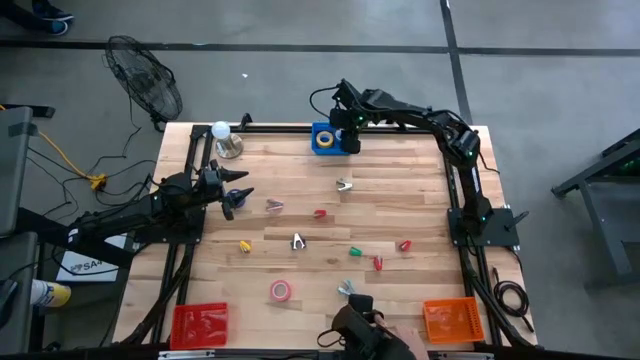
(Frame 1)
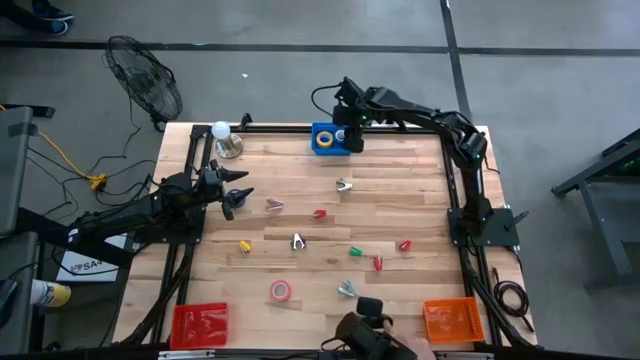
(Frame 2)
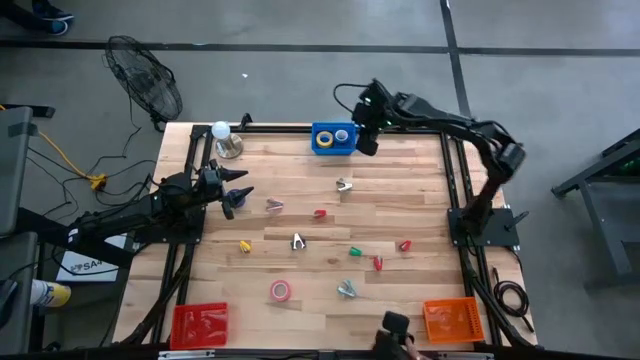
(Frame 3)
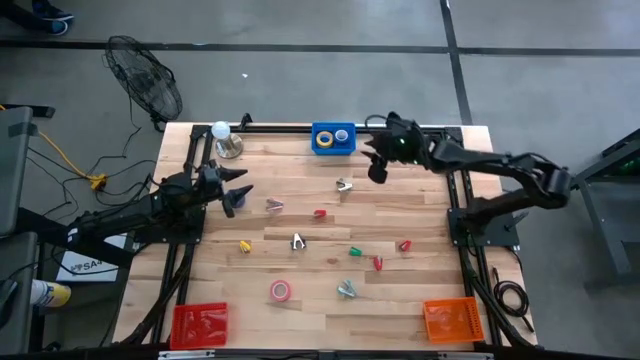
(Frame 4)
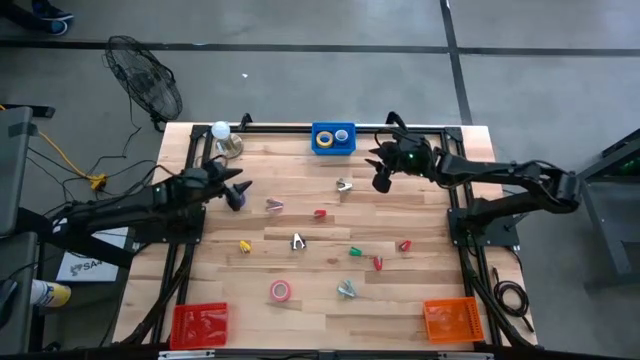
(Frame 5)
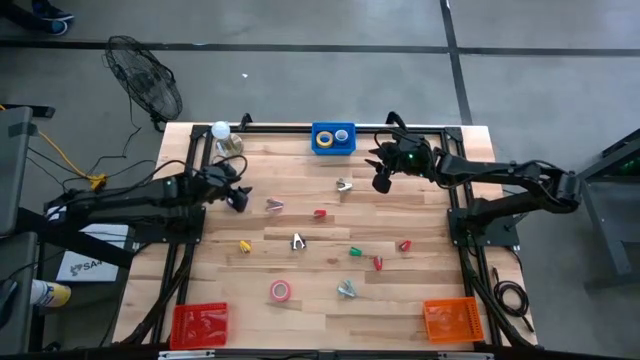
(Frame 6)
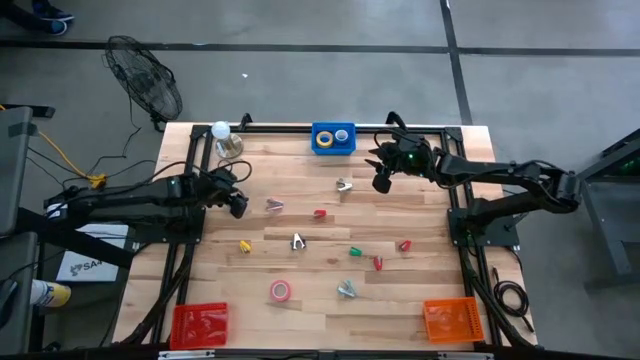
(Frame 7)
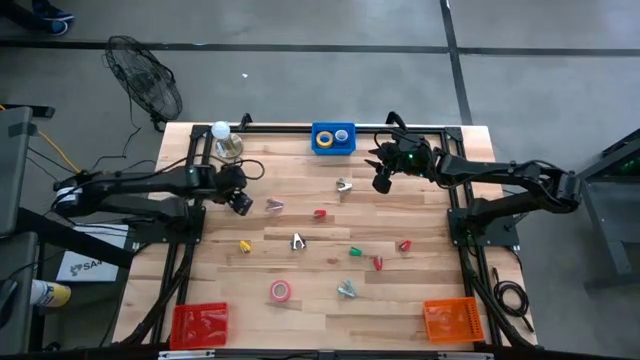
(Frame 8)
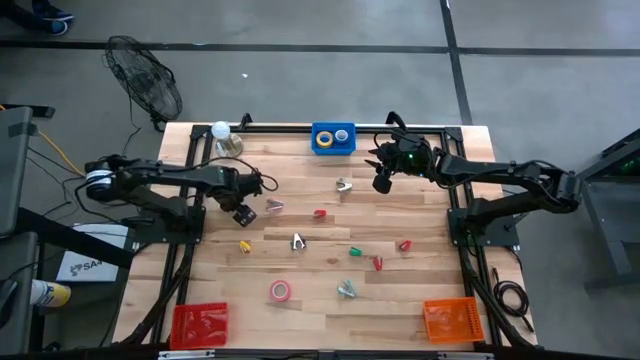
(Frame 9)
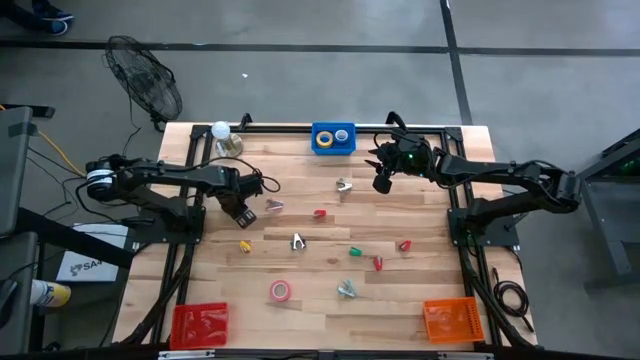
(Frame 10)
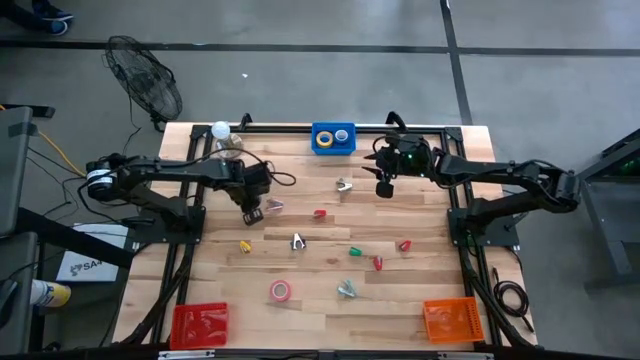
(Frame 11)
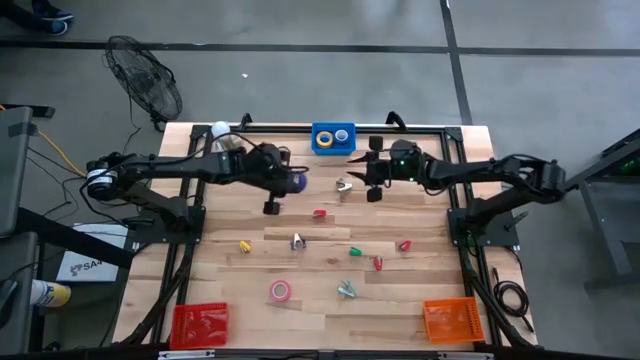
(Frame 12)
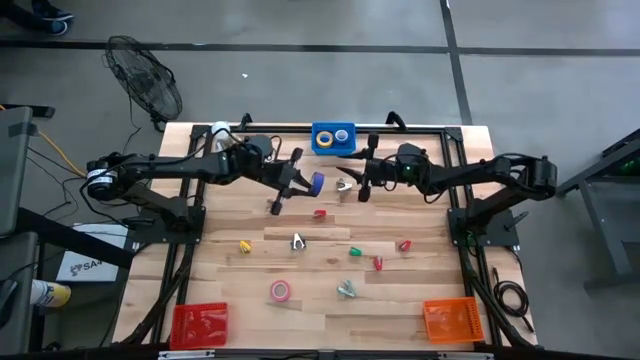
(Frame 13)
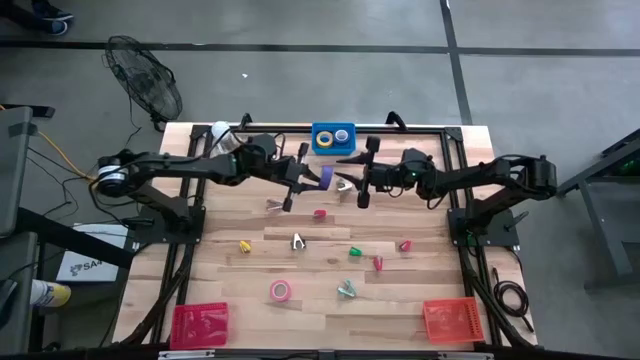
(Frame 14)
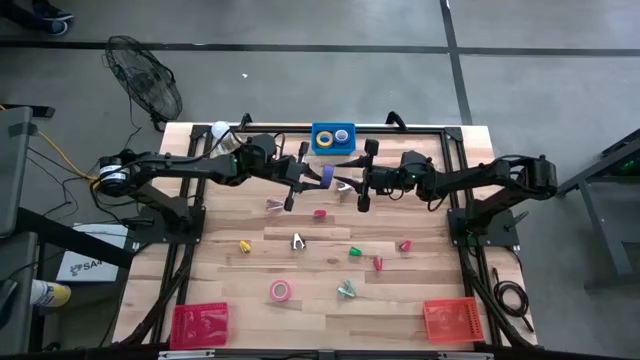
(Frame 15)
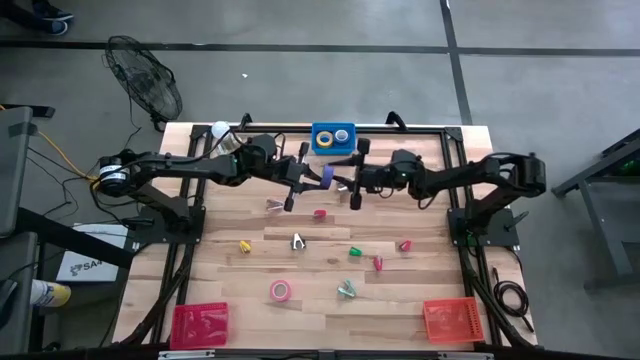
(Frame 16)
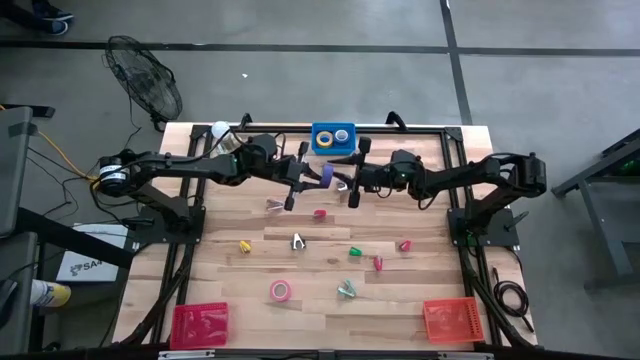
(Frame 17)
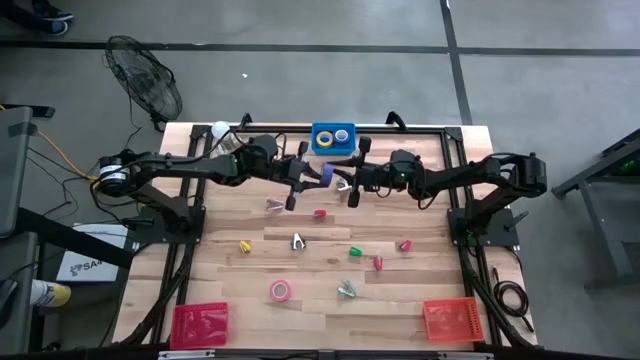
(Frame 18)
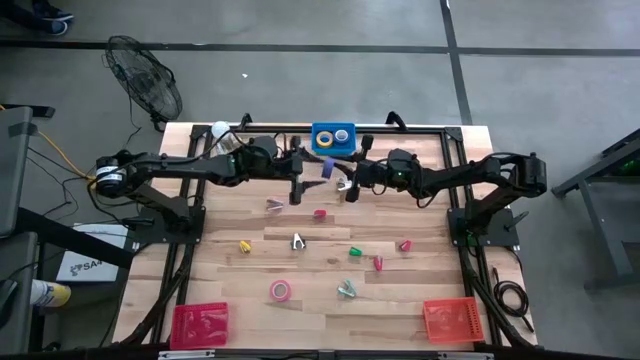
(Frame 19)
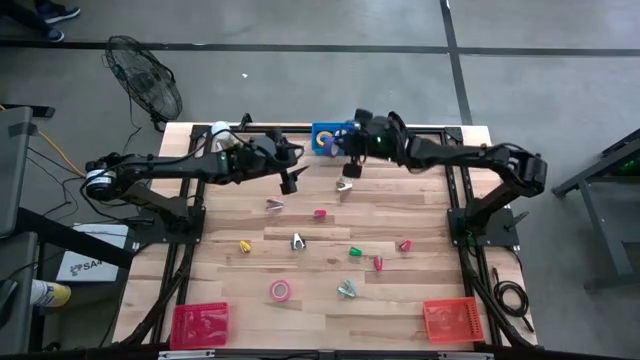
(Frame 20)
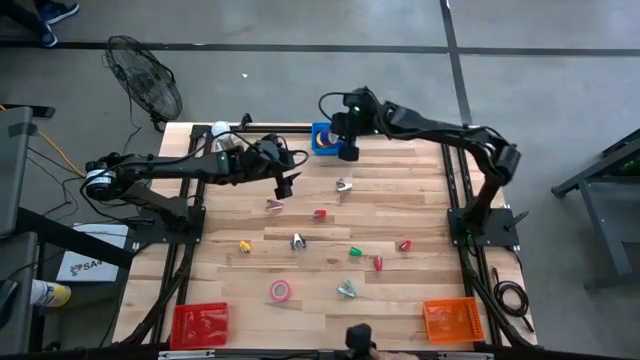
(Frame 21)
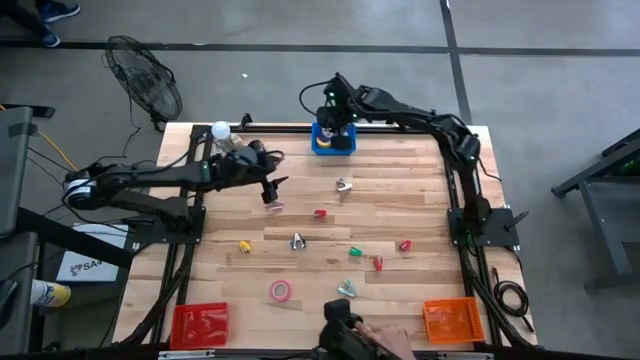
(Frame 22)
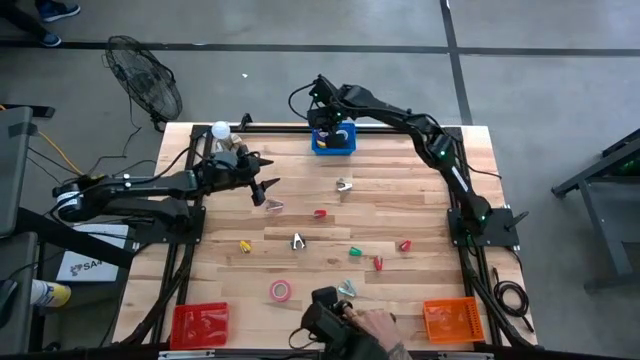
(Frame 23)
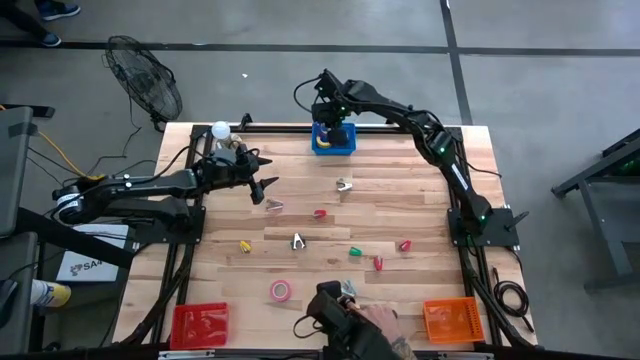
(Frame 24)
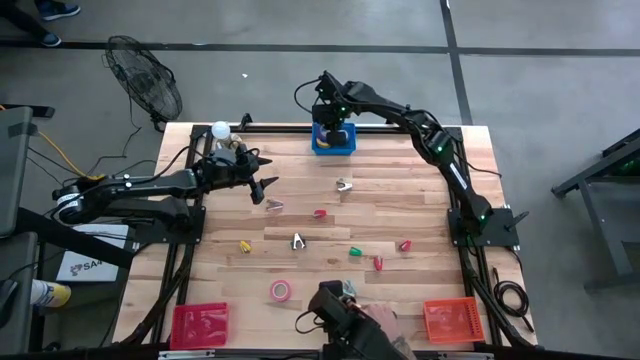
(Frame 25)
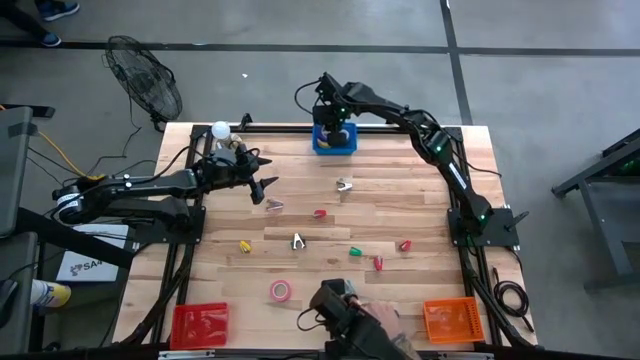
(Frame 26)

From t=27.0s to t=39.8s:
Task: Pick and place Stapler, Stapler remover, tape
Put the blue tape into the blue bin

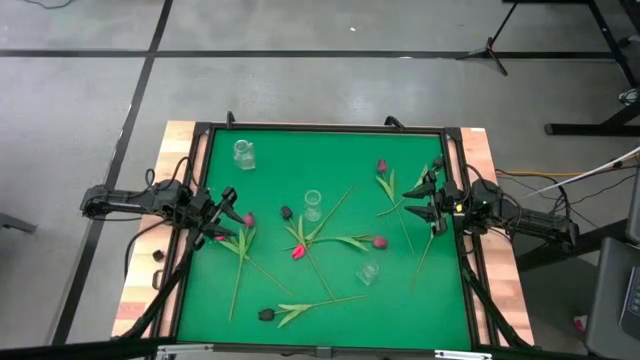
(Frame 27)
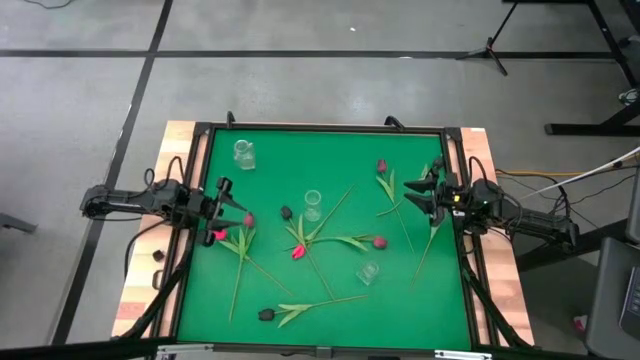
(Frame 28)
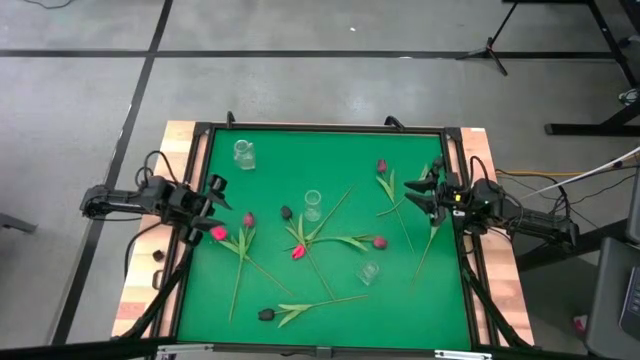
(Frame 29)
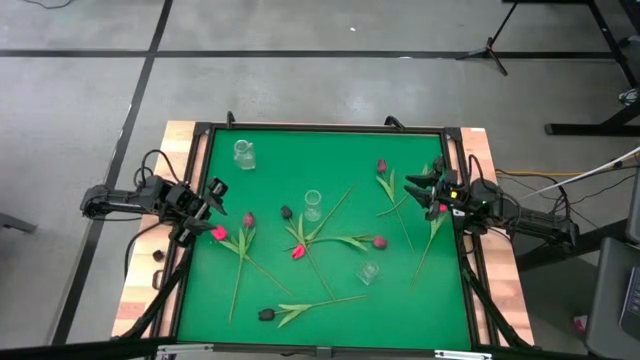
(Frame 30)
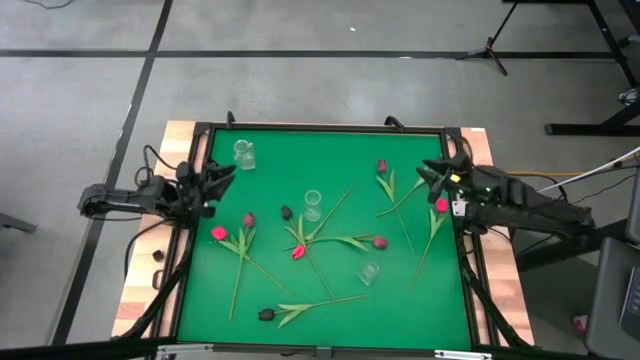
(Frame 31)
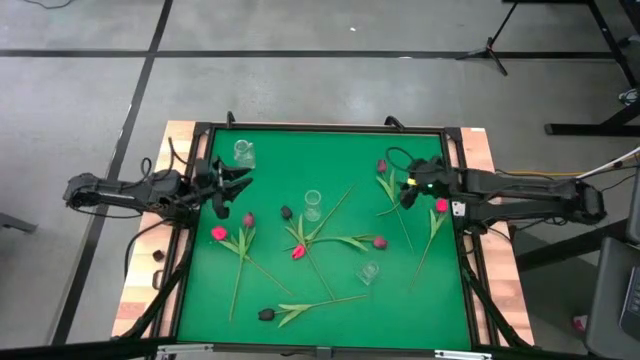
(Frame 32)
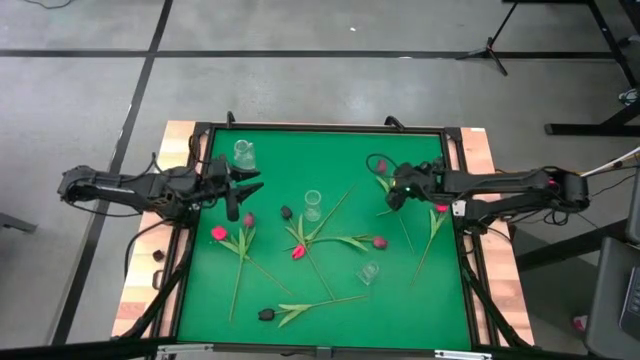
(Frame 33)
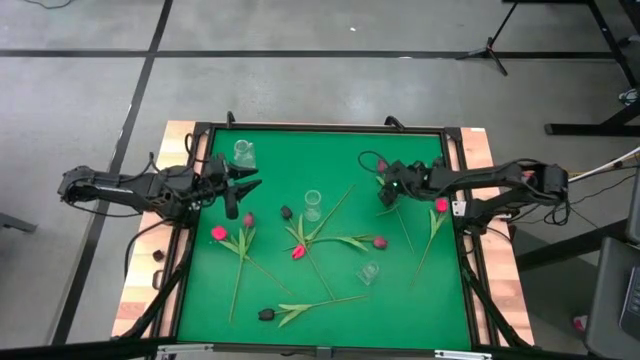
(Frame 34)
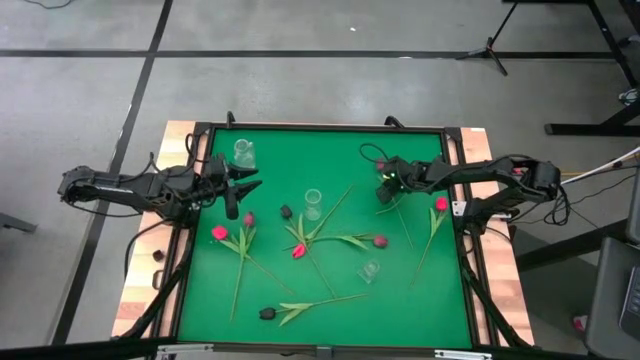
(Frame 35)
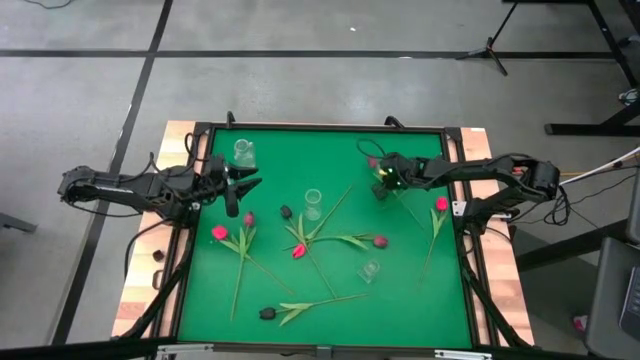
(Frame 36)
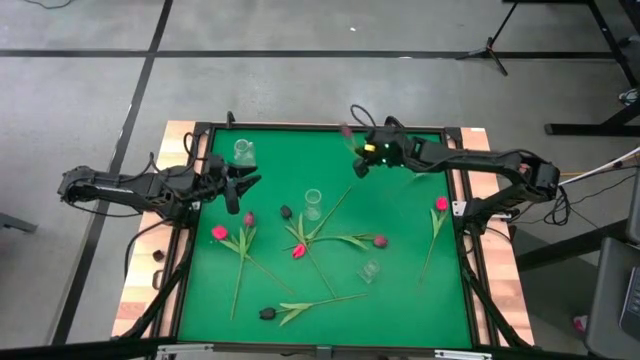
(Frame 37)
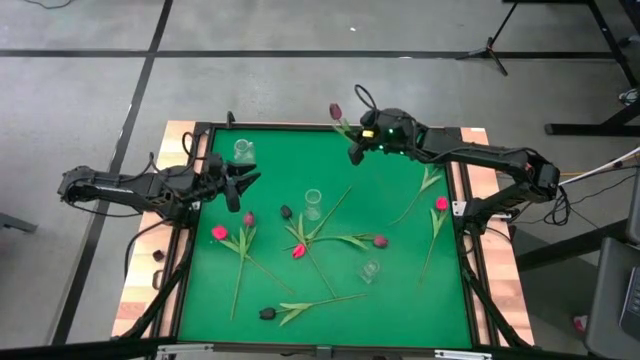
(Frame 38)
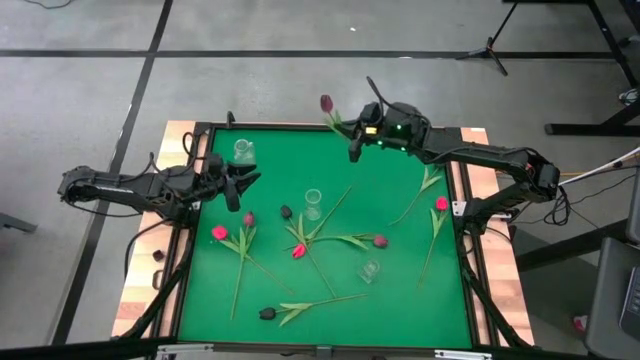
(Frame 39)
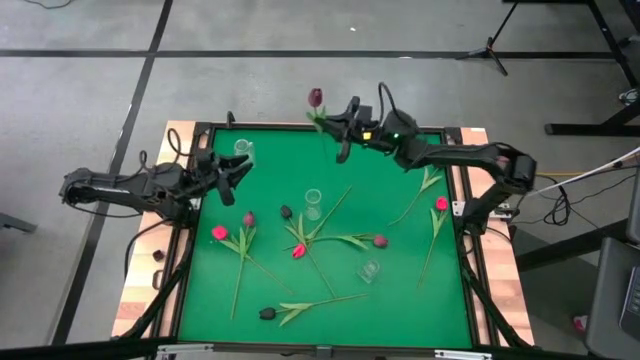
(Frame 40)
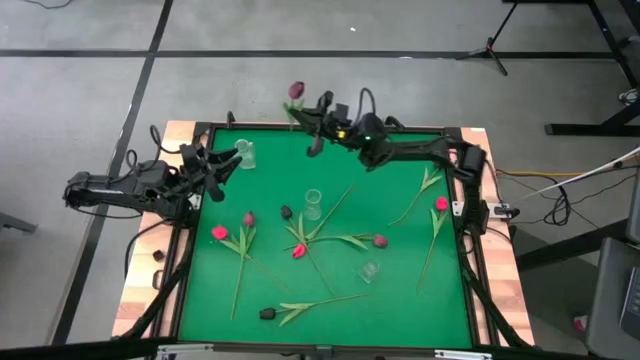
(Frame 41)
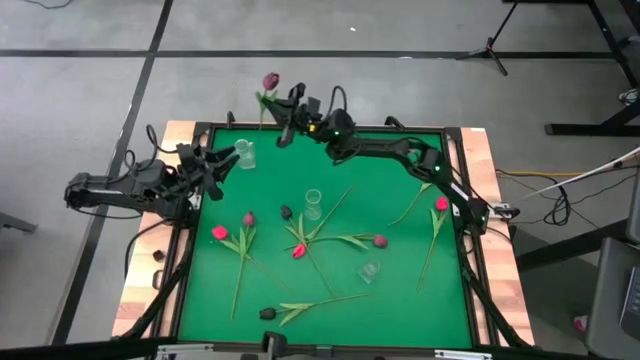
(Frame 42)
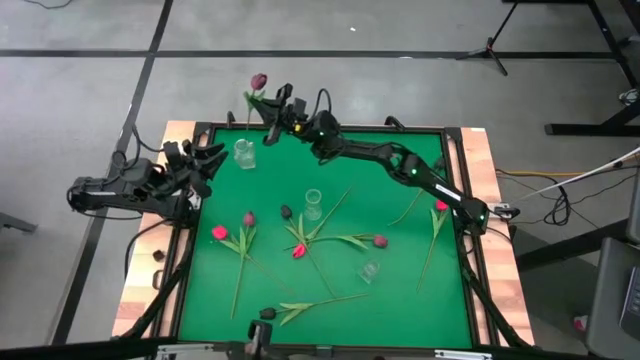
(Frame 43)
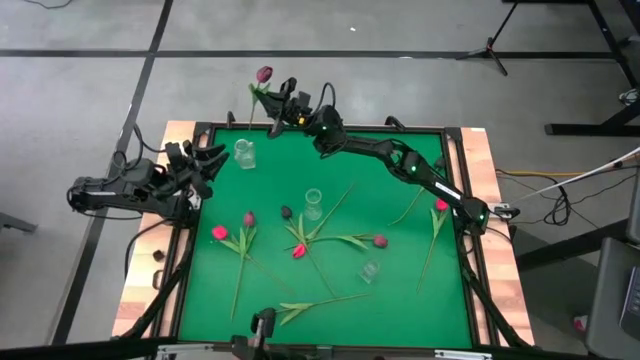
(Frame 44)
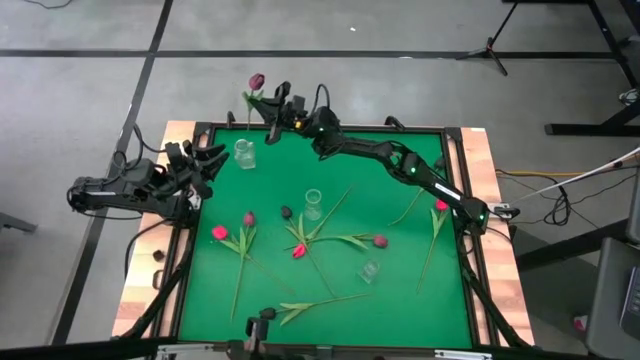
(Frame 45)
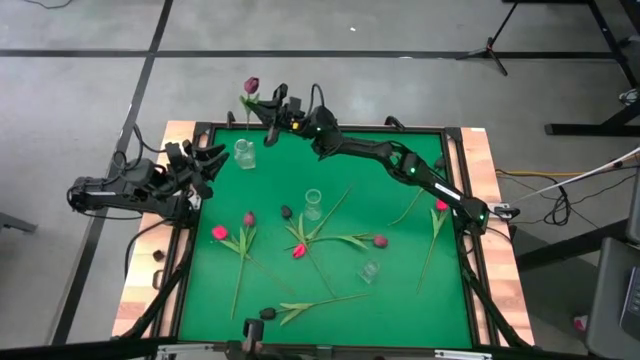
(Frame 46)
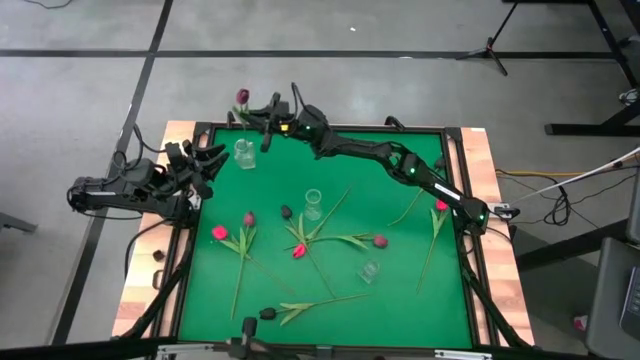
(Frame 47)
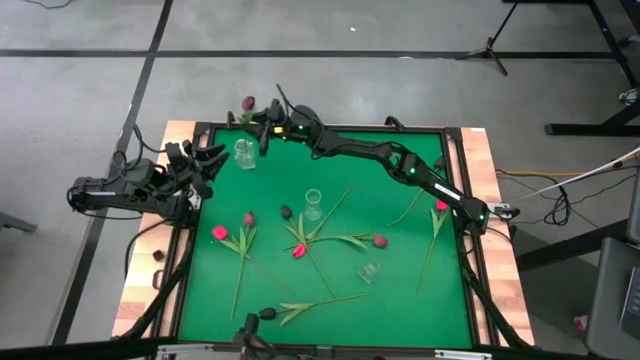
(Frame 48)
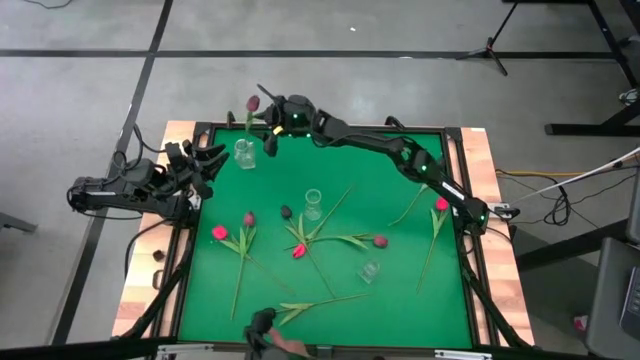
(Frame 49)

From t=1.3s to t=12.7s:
Task: Sort flowers into vase by color
Put the top right dark red tulip into the top transparent vase
